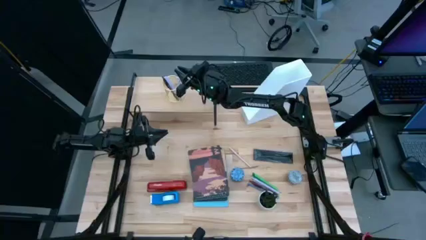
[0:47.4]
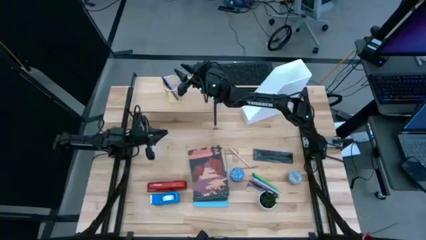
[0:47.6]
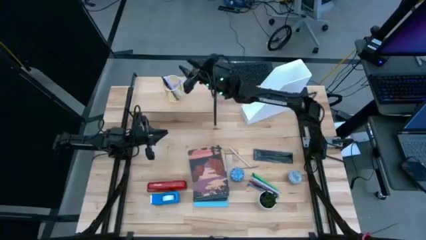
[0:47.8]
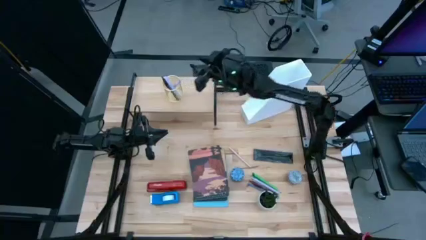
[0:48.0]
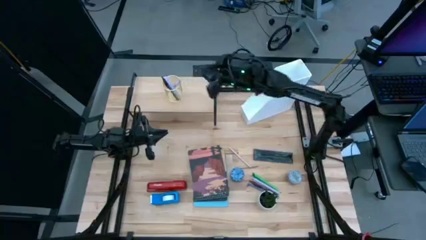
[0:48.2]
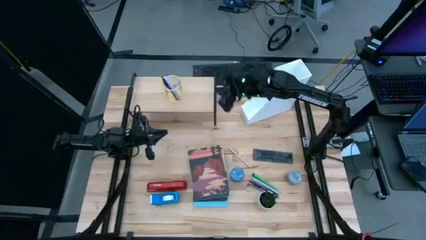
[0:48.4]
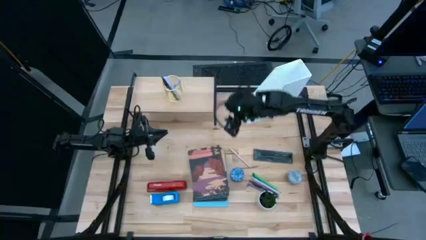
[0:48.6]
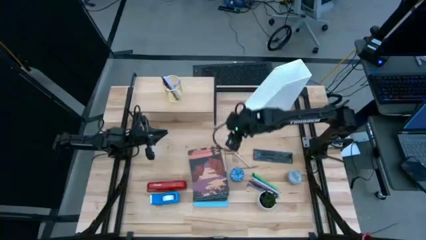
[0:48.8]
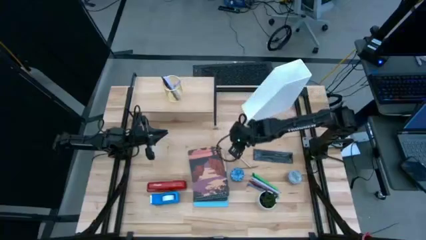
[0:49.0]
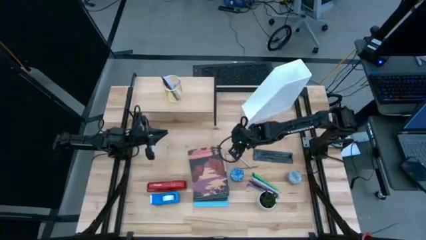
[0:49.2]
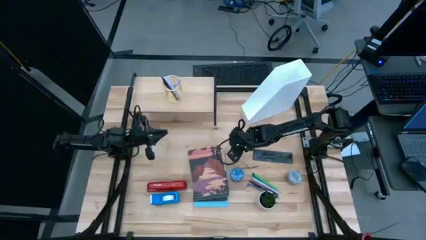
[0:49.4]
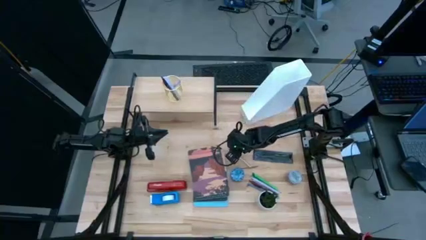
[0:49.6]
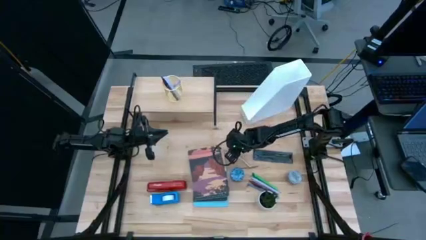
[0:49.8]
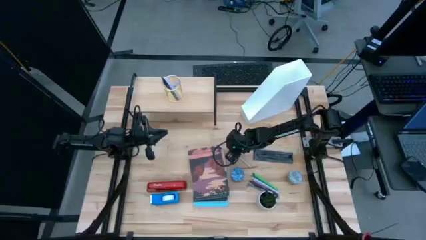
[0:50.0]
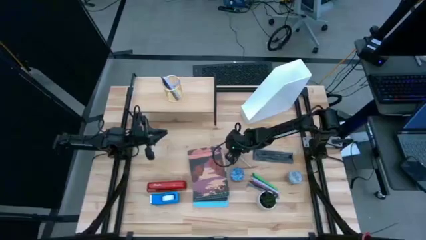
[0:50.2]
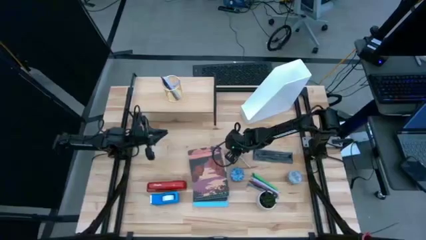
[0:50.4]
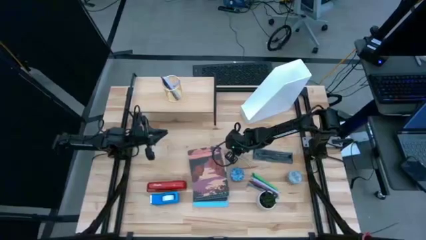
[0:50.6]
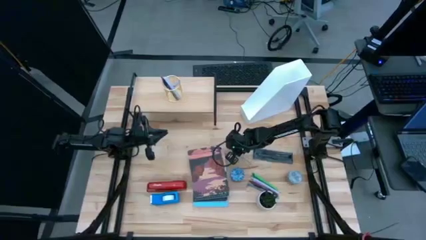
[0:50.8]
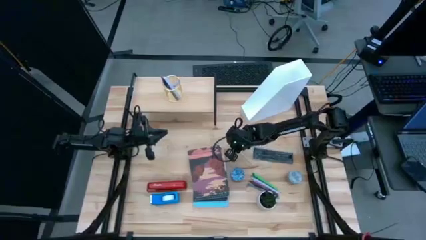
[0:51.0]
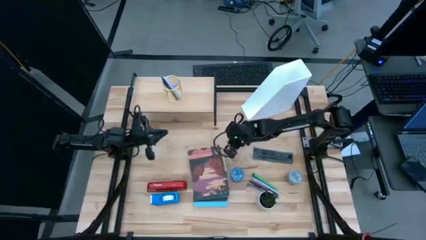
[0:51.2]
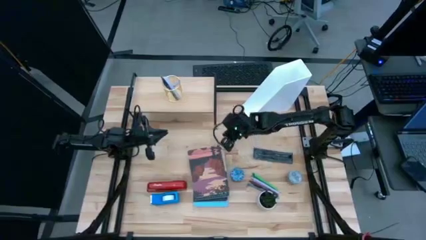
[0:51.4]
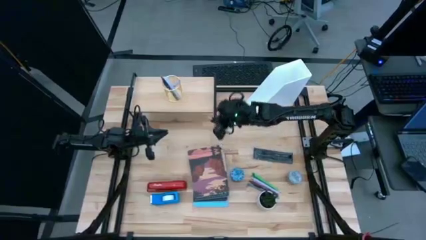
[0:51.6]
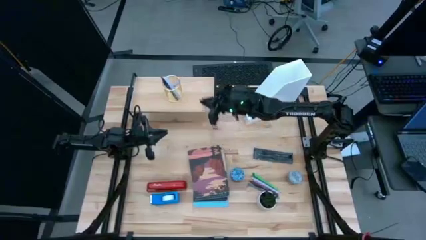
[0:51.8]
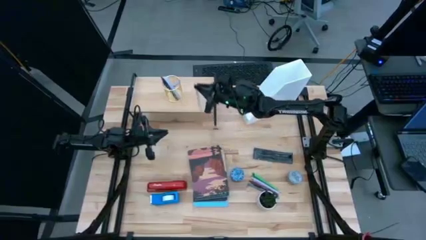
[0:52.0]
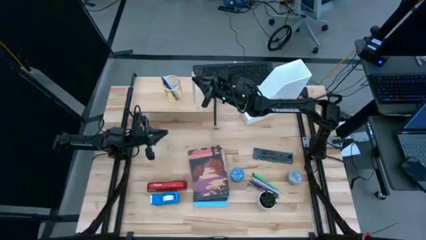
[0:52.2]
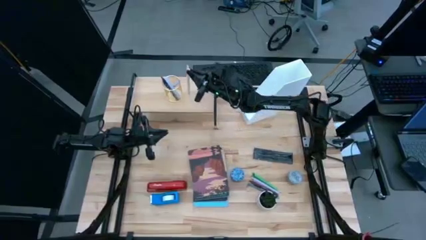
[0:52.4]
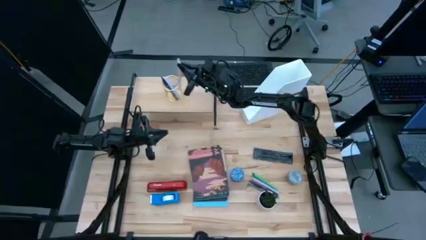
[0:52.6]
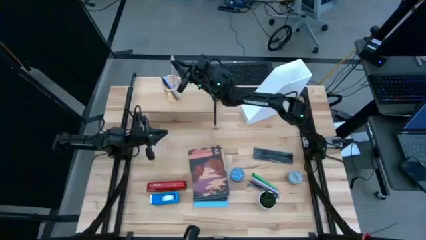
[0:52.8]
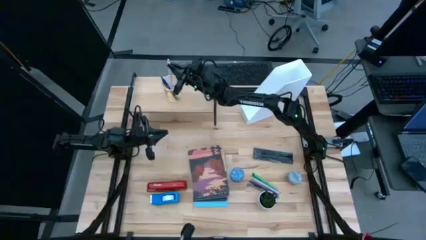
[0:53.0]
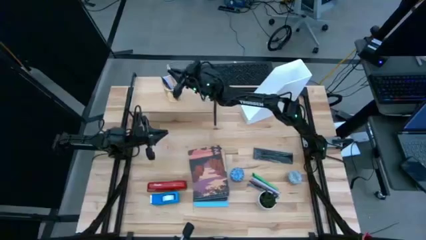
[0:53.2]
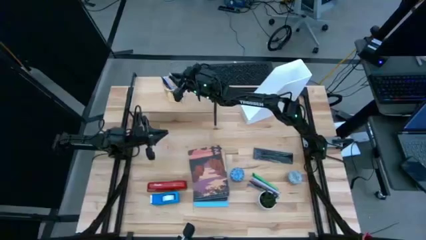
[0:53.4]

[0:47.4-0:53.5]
Task: Stock shelves
Put the pink pen into the gold pen holder on the shelf

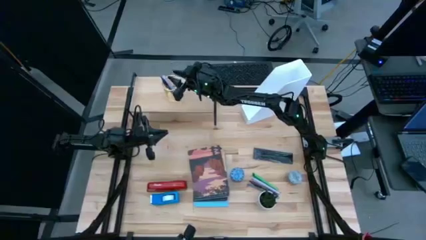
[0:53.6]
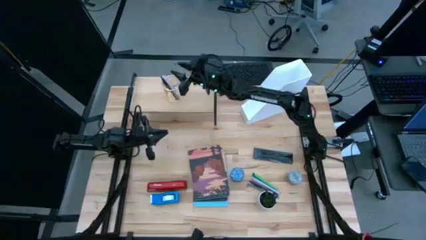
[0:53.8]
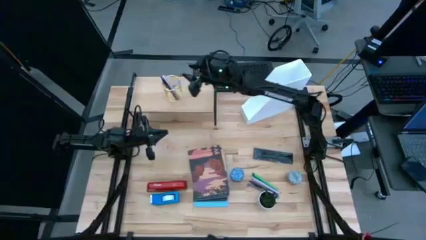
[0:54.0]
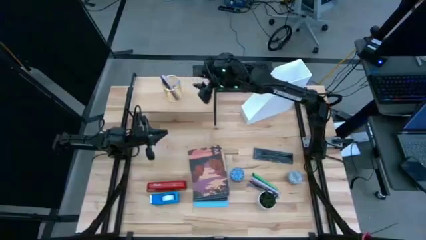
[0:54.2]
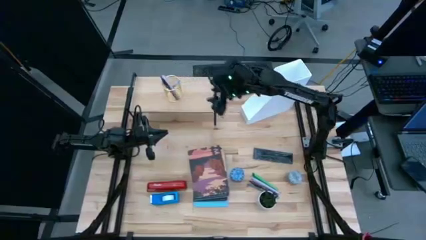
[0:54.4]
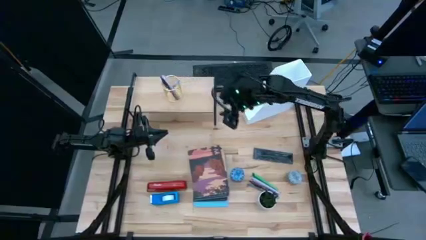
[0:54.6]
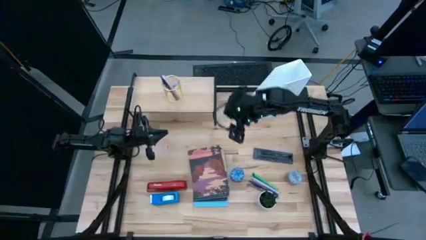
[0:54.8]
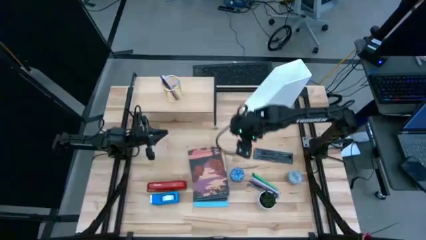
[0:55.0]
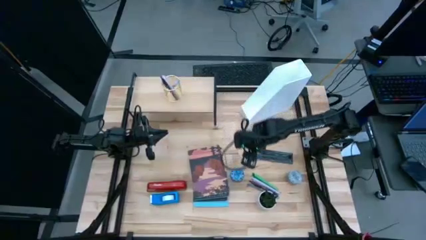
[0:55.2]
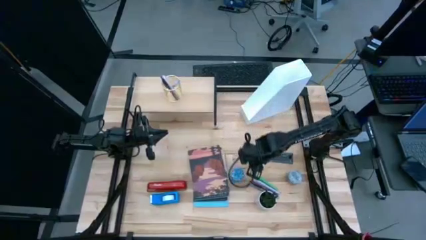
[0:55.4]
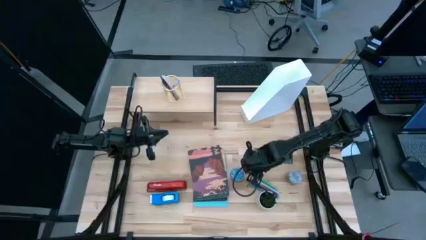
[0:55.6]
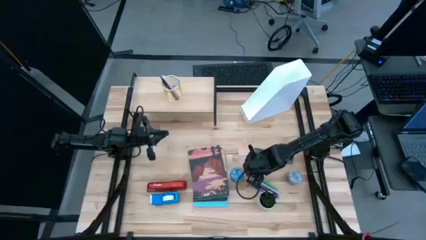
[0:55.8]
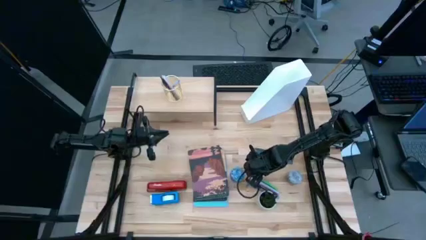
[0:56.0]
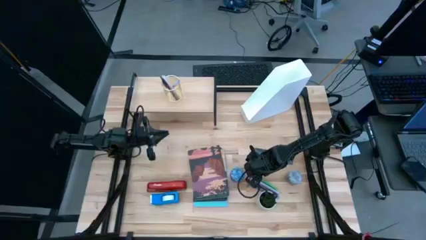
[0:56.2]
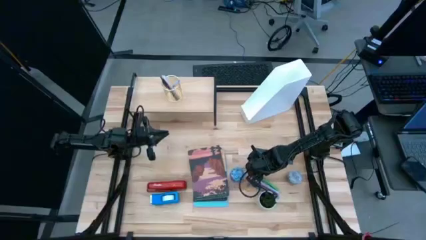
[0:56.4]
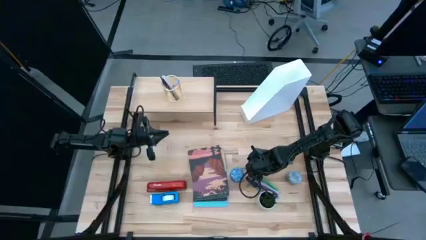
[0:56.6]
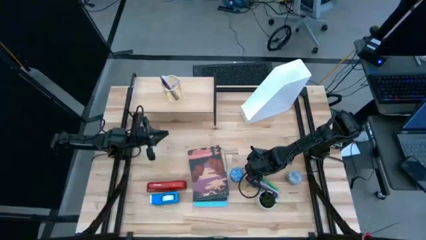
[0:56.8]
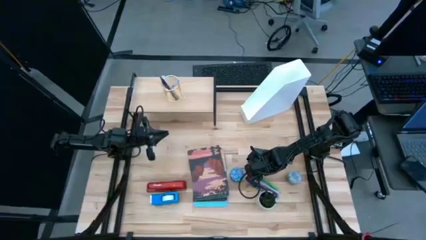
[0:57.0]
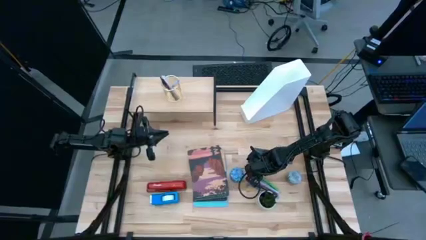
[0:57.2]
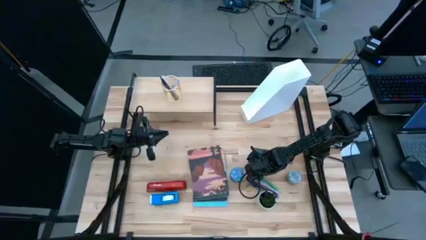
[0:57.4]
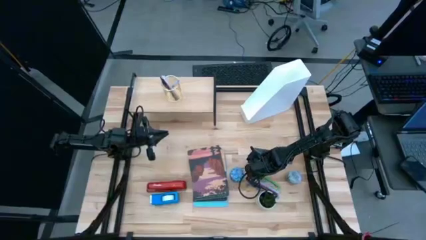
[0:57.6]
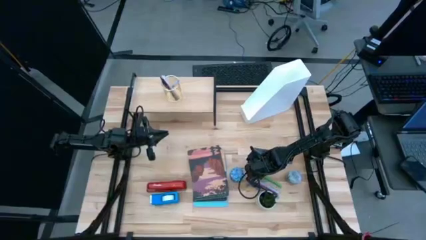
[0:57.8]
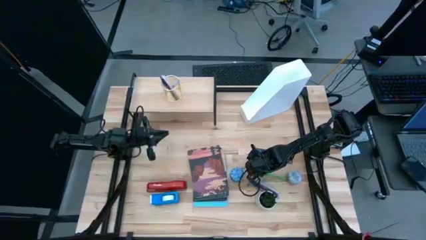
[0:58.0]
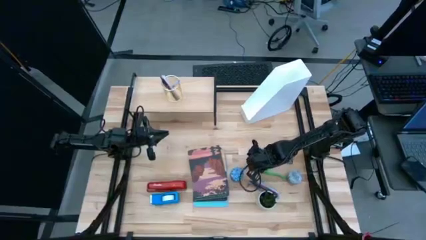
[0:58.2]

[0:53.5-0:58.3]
Put the green pen into the gold pen holder on the shelf

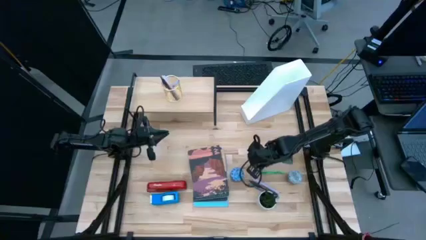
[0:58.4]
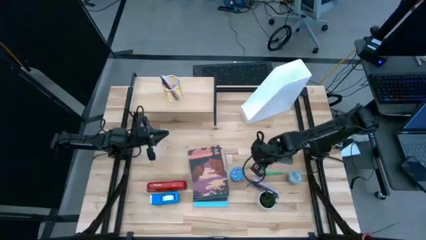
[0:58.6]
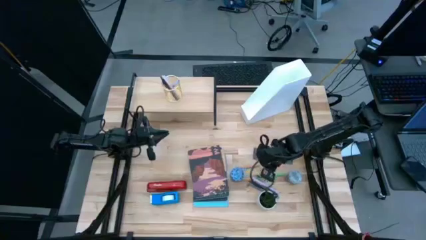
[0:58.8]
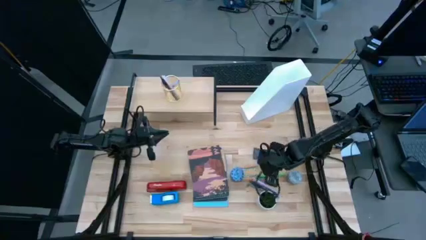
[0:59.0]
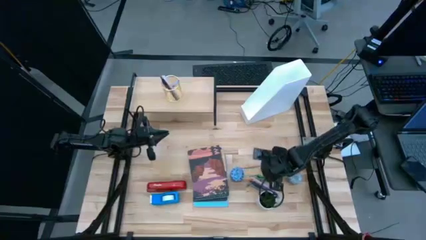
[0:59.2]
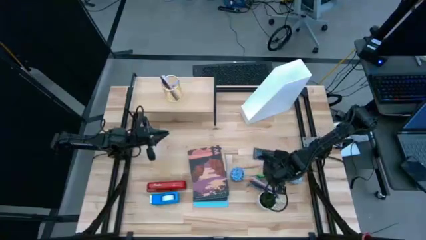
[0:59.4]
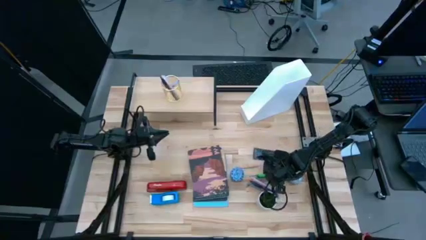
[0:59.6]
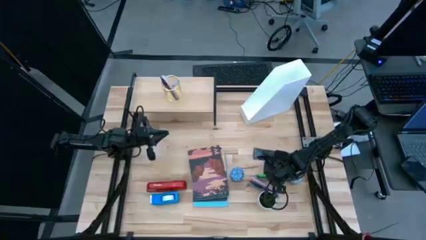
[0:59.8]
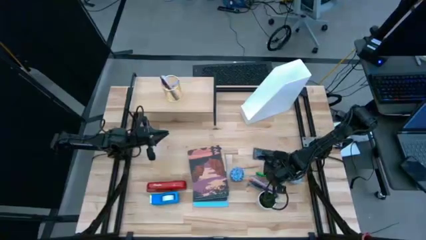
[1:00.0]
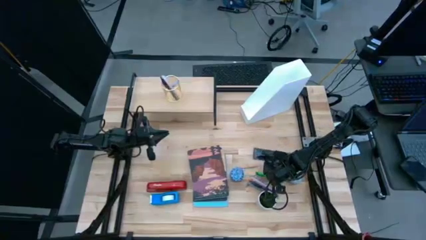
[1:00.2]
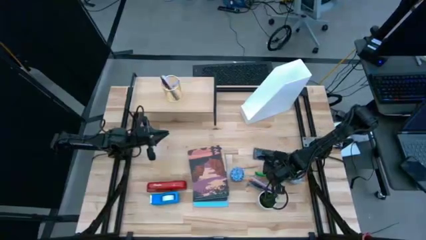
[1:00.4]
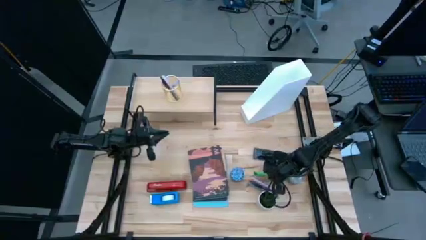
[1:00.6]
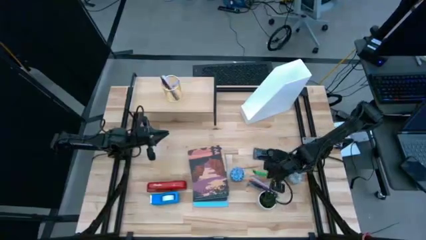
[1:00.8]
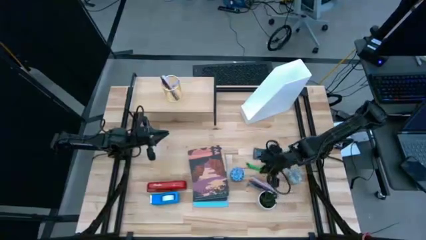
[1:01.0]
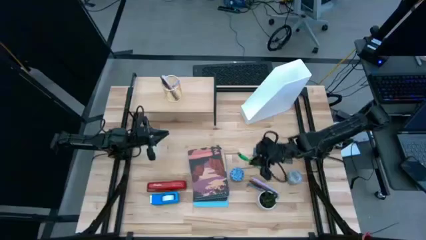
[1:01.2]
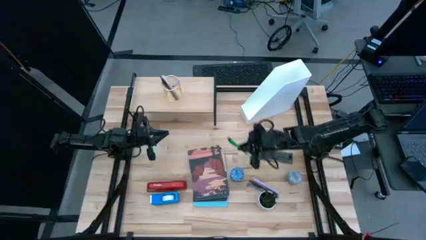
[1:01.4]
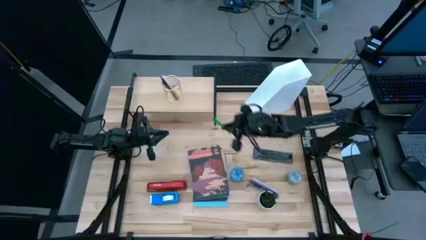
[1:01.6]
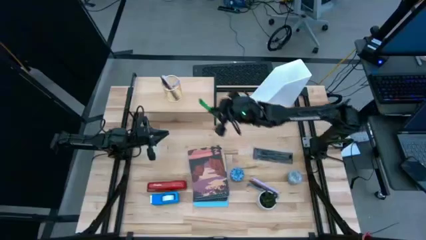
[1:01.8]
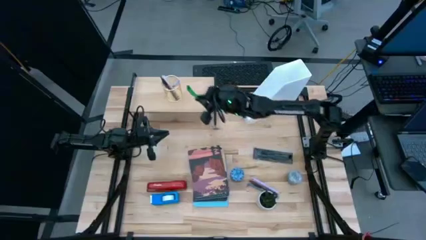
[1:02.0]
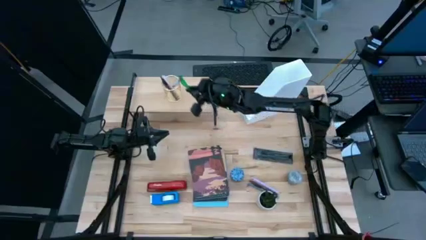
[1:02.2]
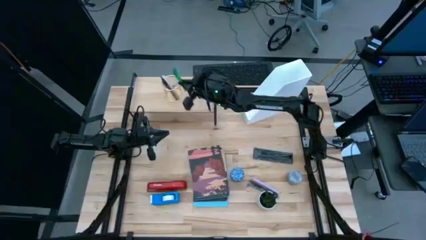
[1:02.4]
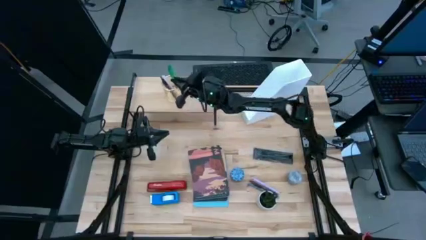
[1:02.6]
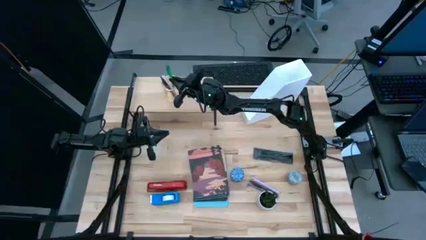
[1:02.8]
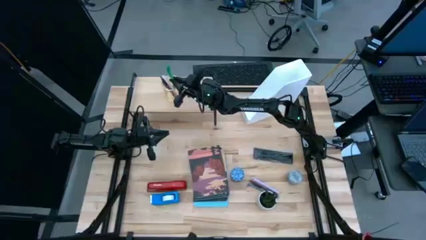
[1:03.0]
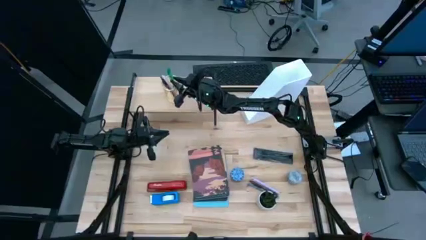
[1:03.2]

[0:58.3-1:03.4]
Put the green pen into the gold pen holder on the shelf

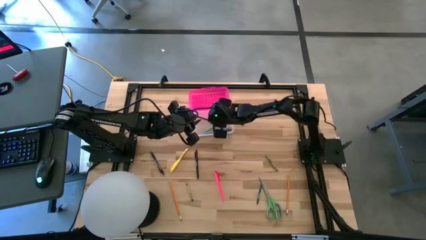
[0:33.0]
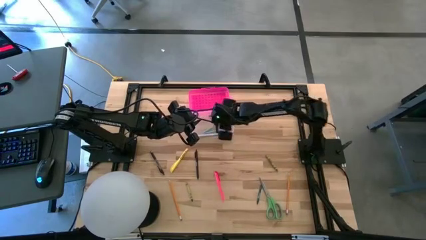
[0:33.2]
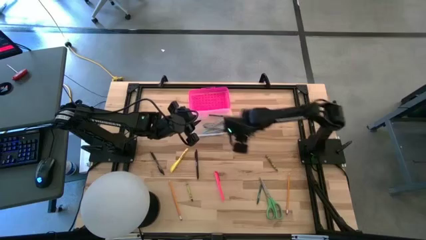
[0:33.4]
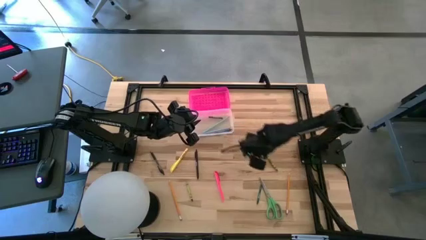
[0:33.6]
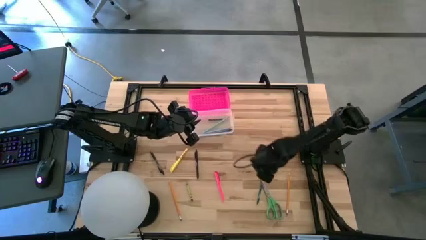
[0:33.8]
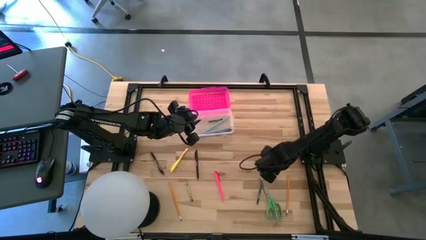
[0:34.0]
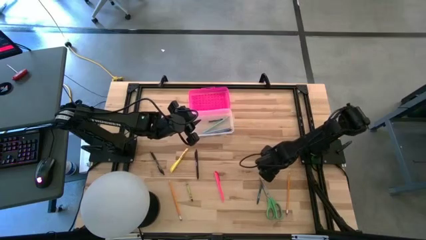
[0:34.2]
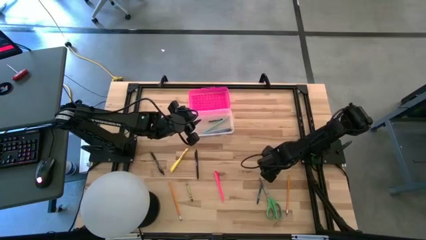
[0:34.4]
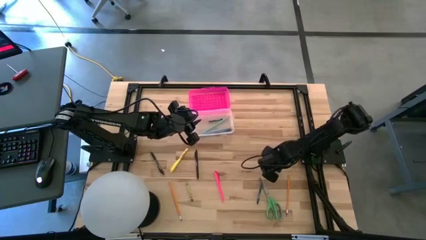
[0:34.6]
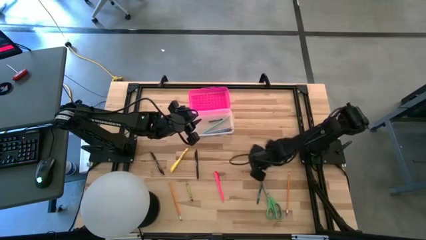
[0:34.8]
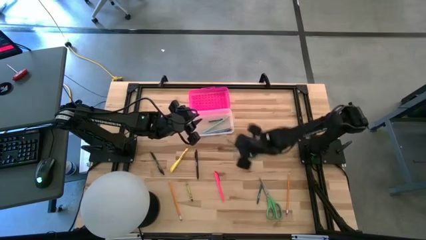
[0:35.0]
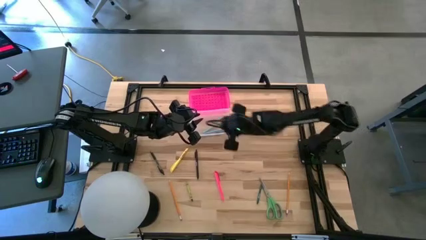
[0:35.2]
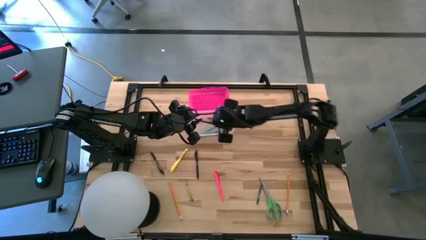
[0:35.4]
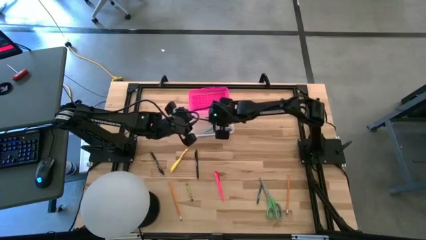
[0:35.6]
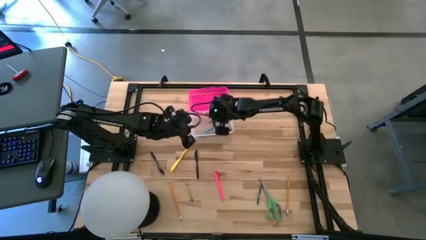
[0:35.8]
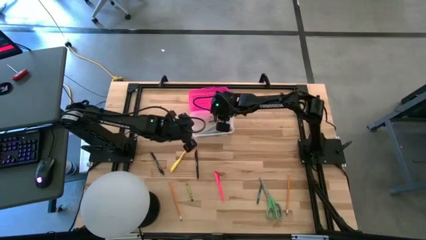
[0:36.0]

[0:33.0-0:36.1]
Task: Pick & place school supplies into a supply box
Put the light green crayon into the pink supply box
